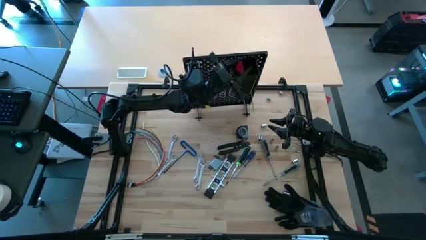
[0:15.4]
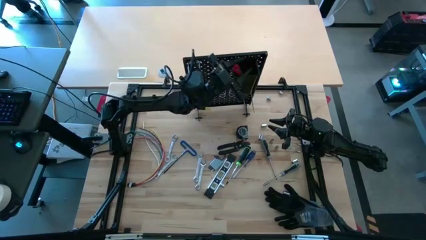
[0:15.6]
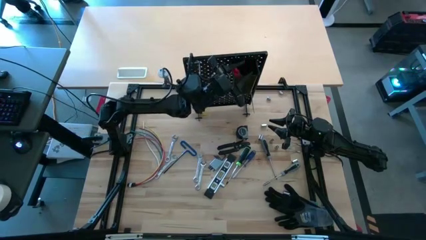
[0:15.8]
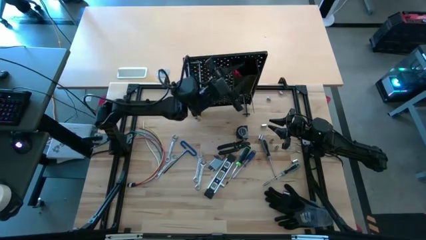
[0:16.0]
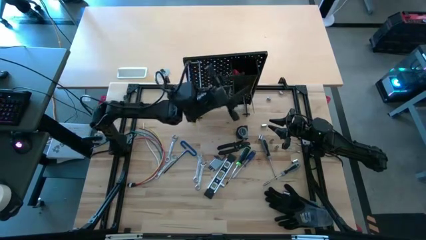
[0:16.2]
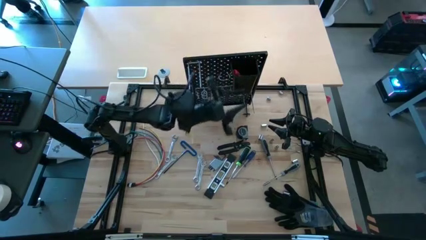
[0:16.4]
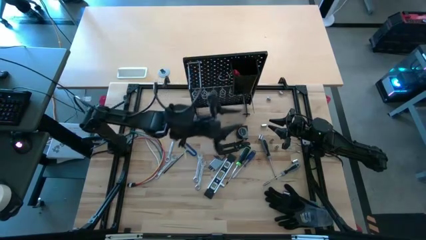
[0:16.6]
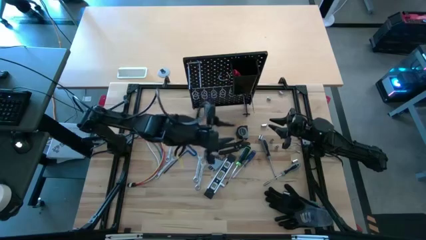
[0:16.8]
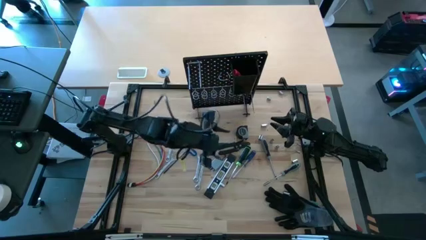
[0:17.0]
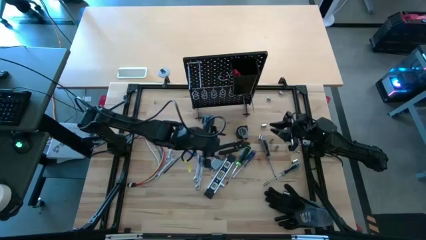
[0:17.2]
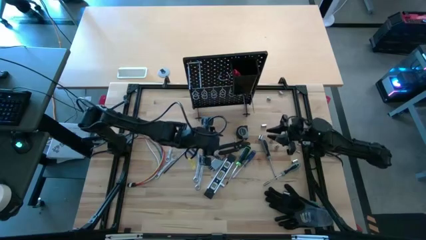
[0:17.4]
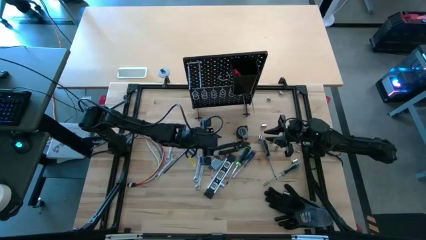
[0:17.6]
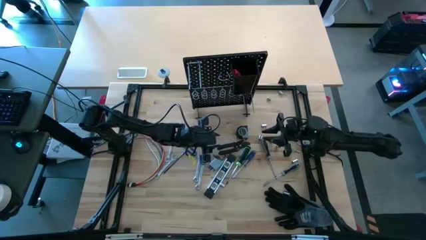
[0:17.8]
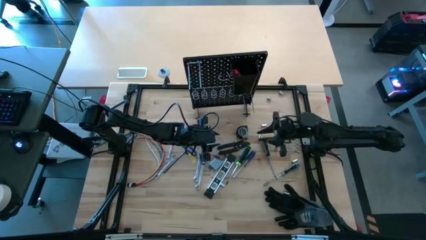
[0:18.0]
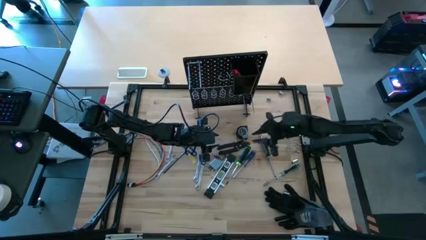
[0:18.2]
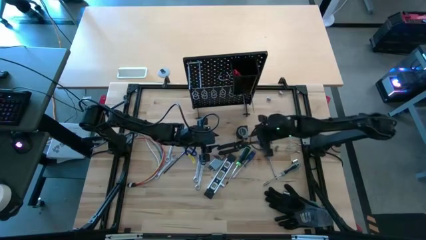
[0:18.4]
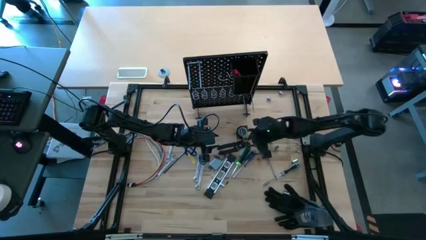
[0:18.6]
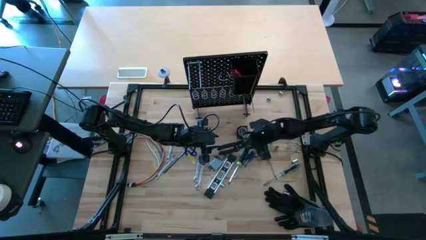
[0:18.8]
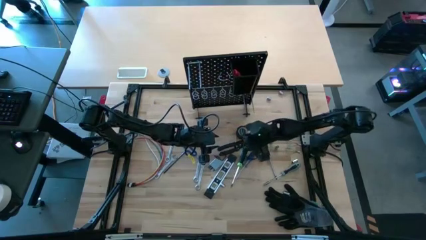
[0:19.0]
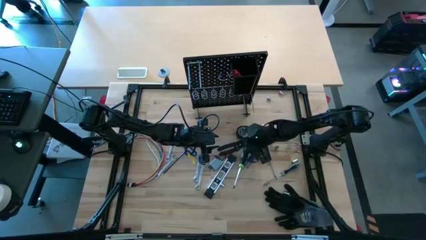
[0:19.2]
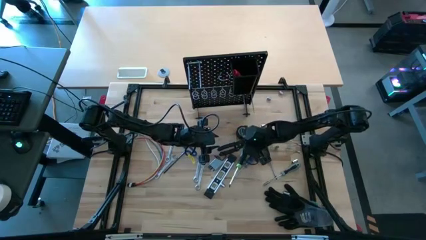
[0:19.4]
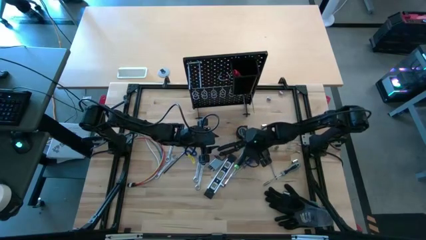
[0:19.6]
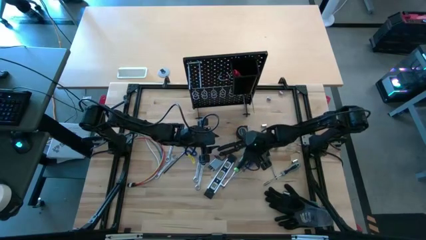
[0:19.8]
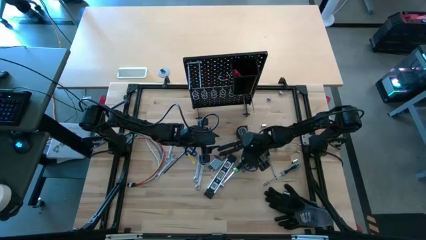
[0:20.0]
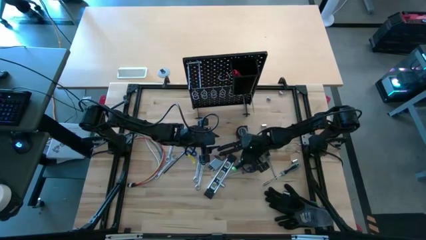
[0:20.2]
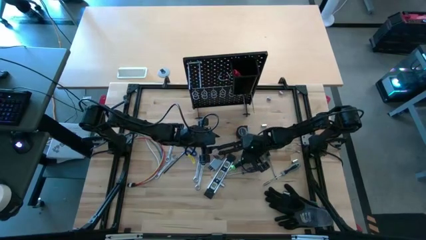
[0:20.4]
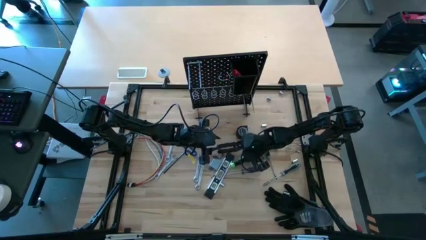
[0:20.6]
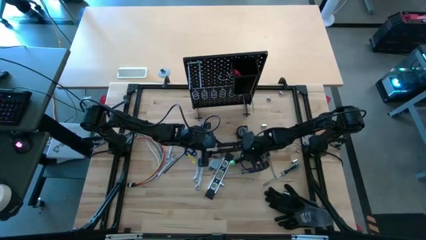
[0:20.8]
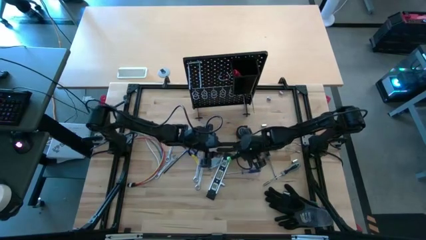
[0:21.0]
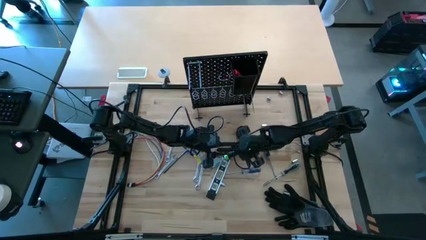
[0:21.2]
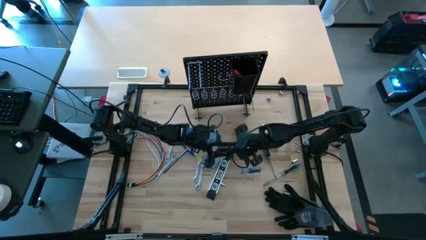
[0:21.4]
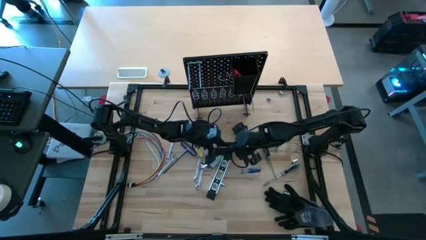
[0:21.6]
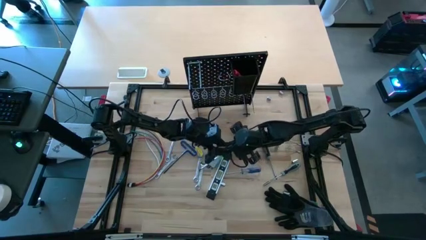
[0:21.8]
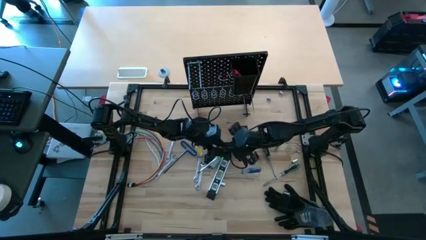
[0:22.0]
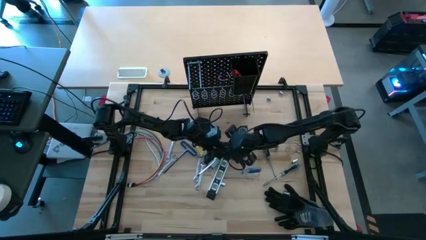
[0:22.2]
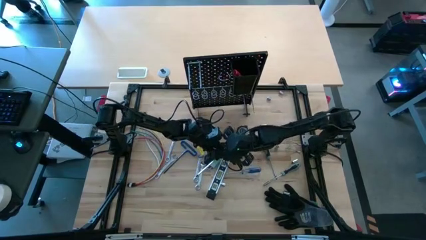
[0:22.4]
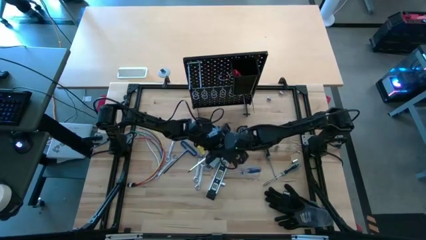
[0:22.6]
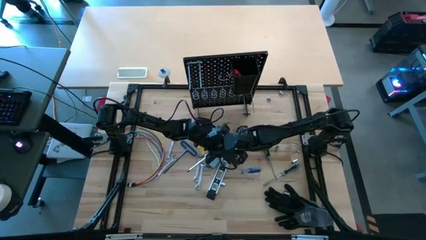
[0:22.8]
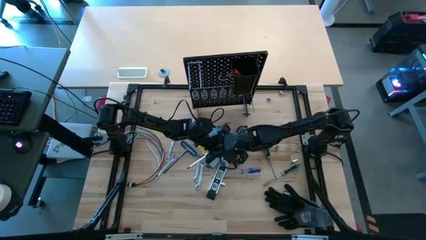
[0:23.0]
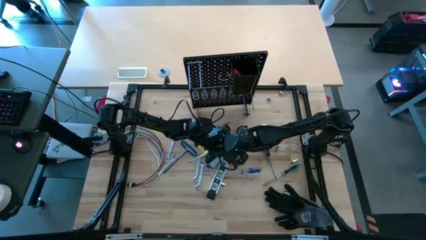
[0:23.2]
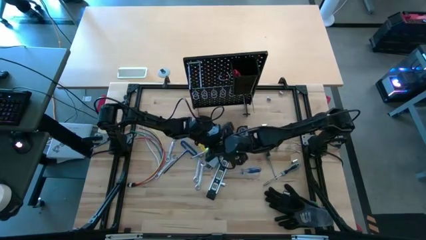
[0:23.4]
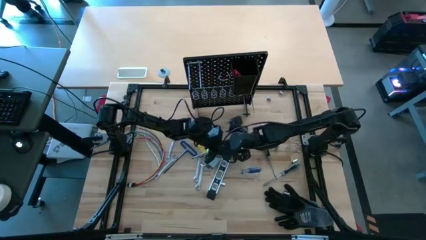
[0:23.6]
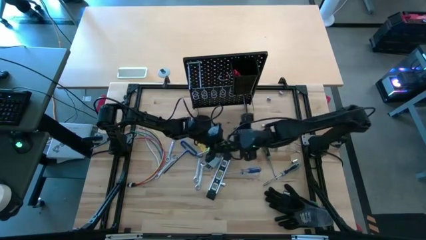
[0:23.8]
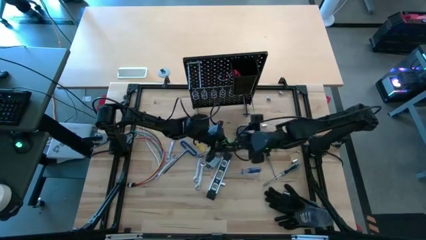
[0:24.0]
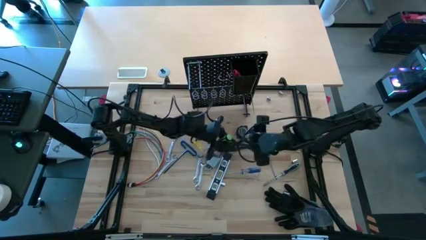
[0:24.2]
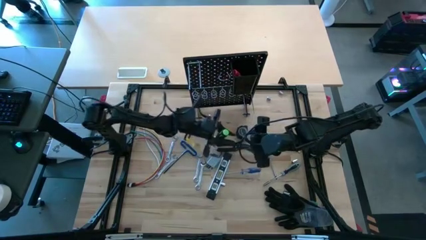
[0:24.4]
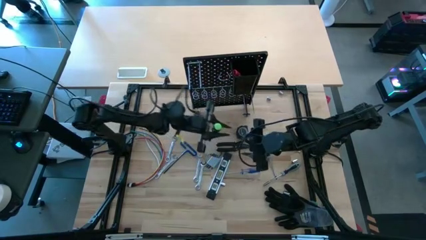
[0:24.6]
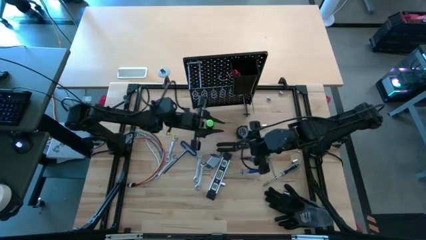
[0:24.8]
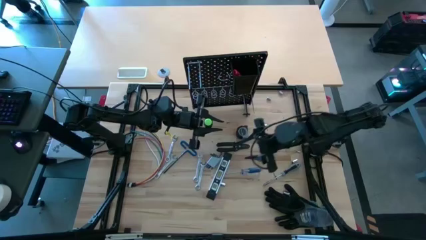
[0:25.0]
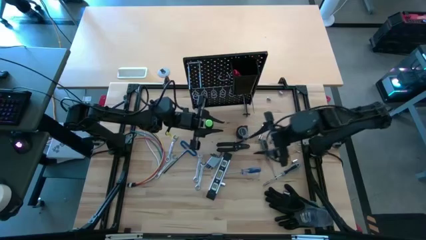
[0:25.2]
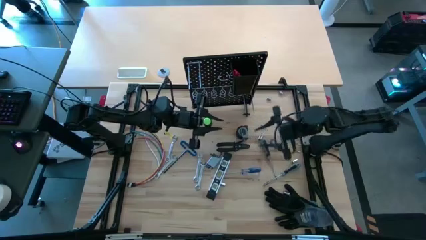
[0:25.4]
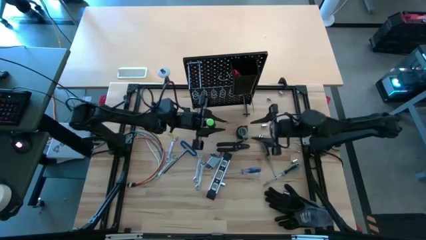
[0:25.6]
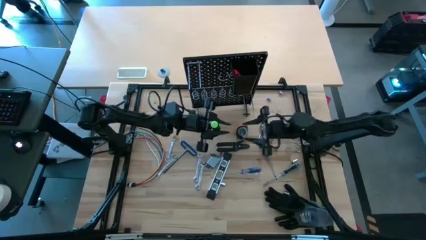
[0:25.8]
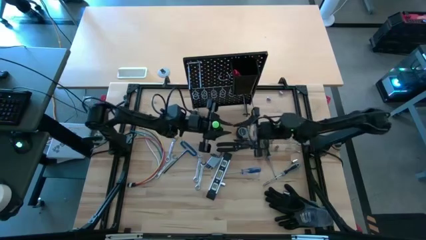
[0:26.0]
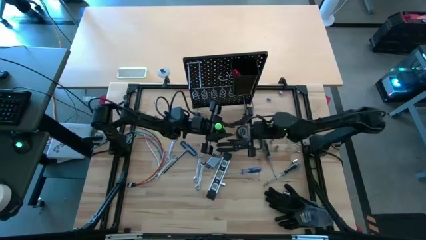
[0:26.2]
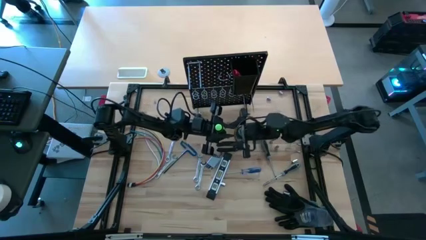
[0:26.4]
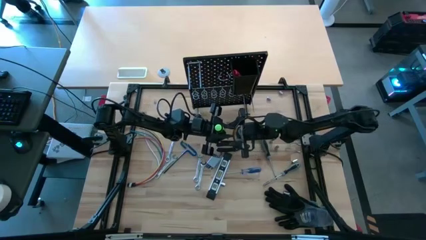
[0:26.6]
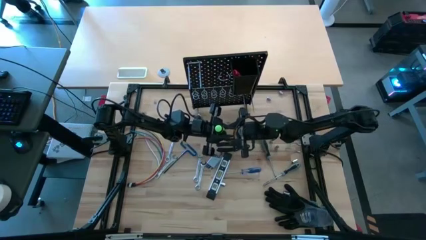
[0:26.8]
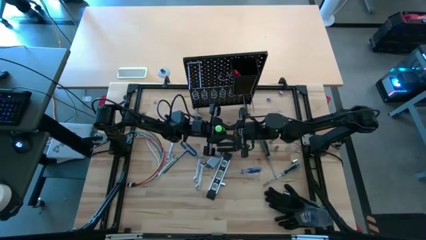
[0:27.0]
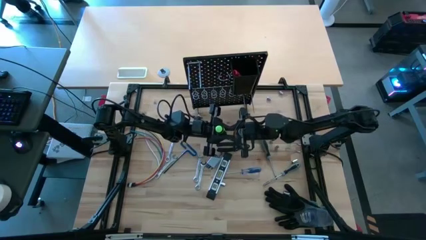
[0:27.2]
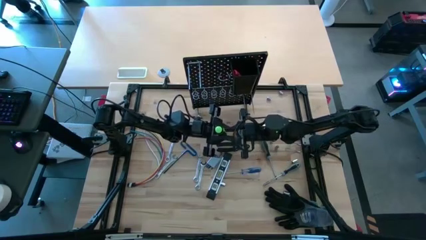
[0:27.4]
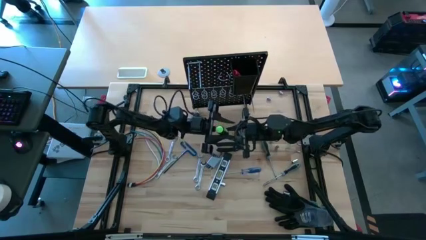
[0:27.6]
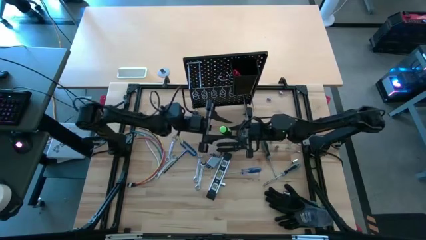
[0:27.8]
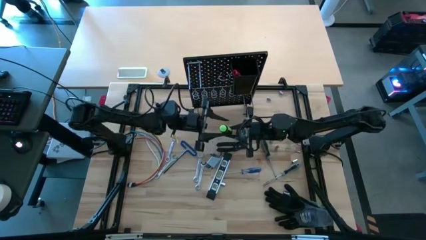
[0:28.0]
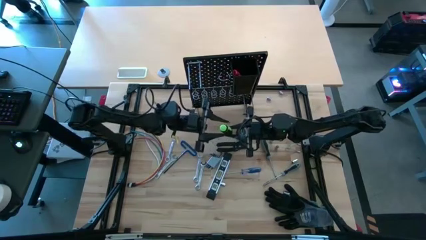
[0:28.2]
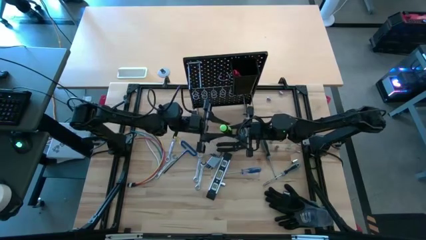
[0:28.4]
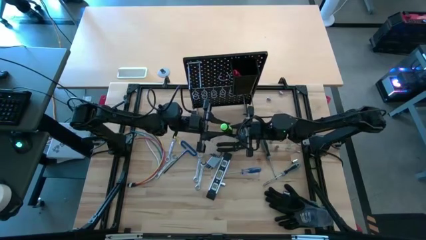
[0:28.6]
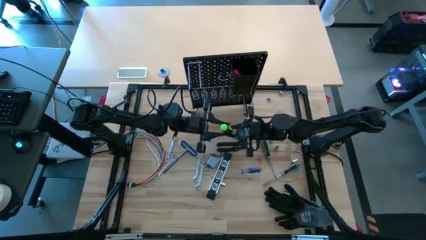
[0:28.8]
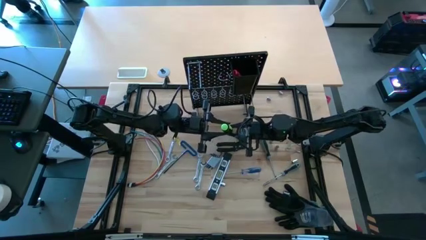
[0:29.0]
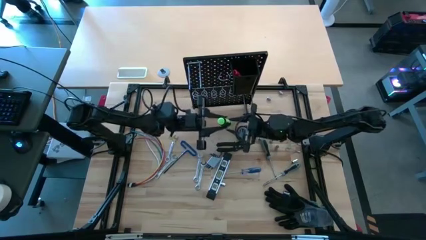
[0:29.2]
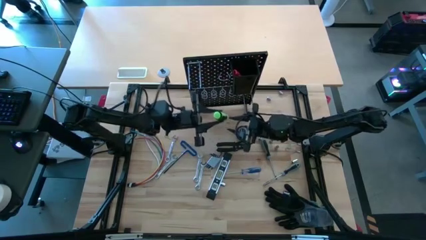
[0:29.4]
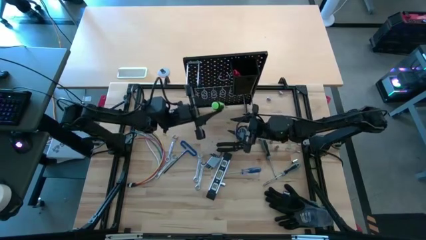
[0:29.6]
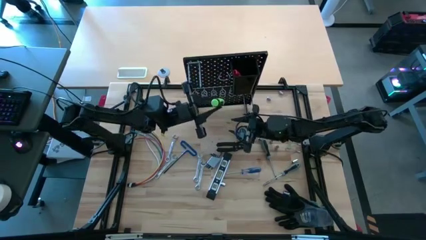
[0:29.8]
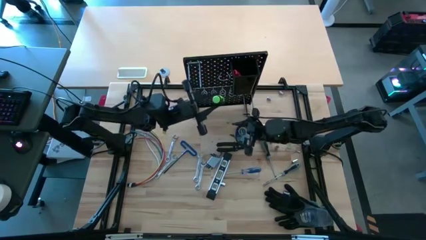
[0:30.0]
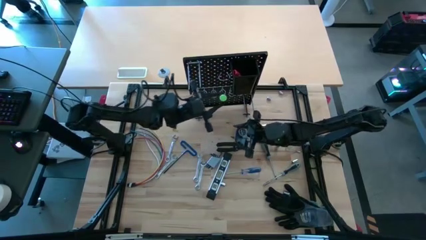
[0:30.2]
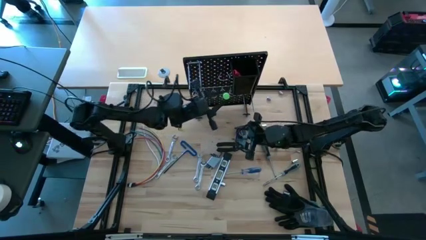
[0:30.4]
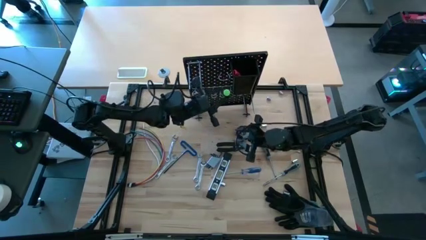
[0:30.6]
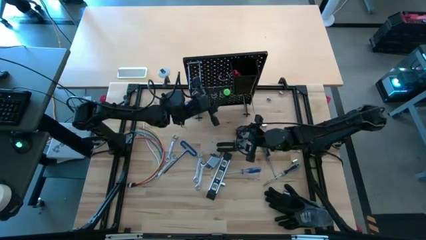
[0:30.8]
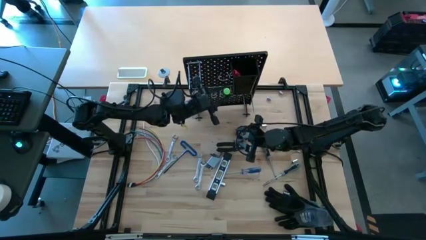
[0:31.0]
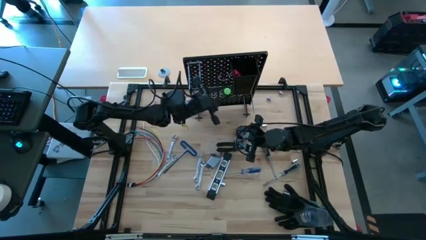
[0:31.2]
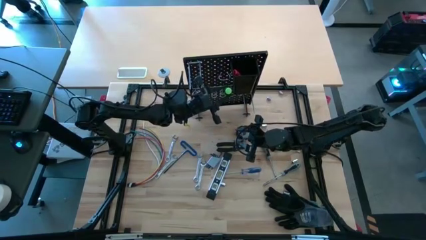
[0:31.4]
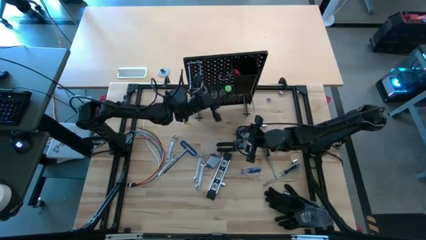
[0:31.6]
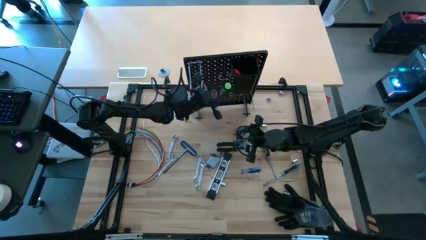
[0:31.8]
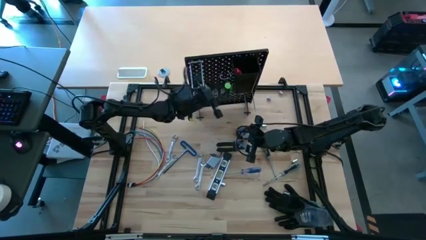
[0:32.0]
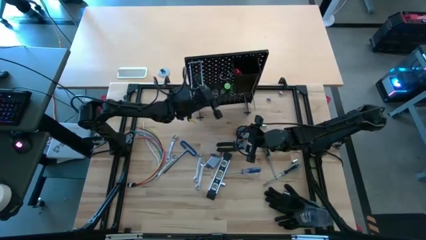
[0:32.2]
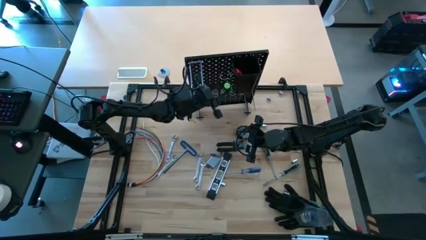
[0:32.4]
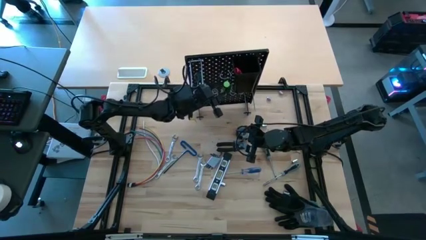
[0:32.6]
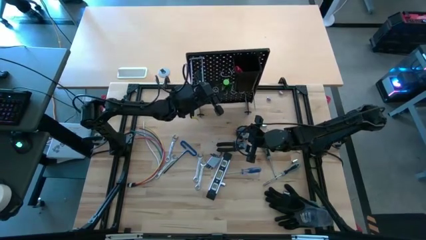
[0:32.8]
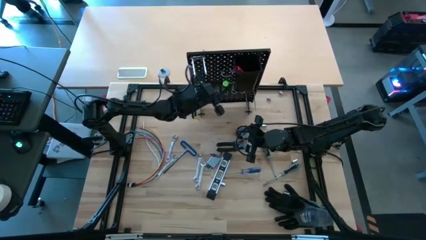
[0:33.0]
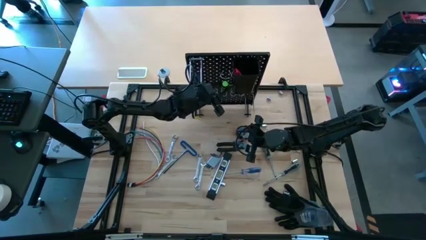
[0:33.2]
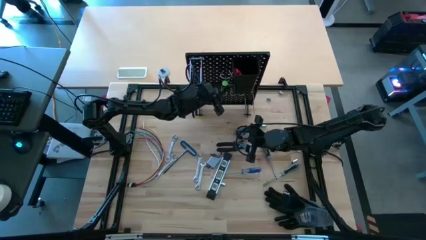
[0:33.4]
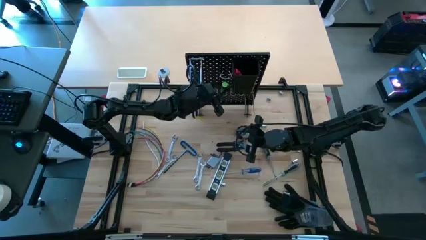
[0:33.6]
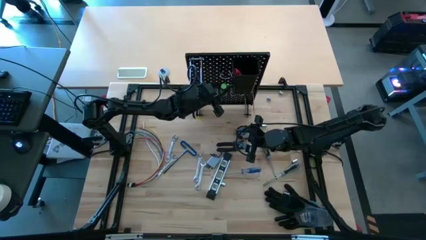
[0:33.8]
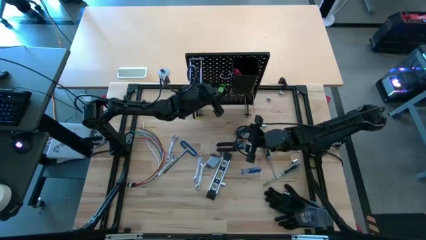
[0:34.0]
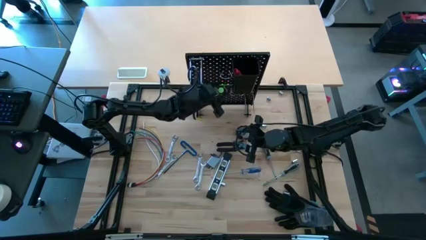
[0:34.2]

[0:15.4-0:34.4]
Task: Hang tools onto peg board
Hang the green screwdriver on the peg board
